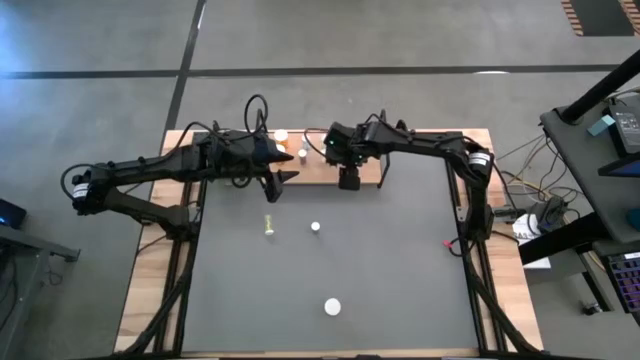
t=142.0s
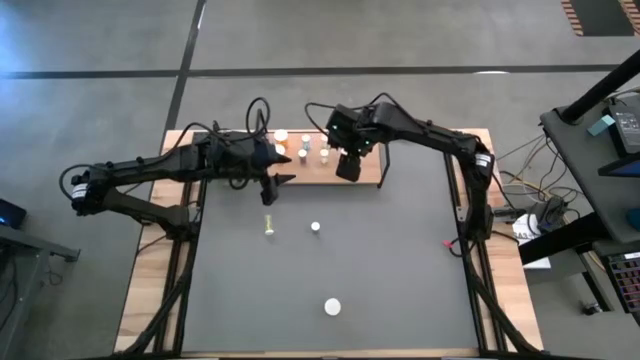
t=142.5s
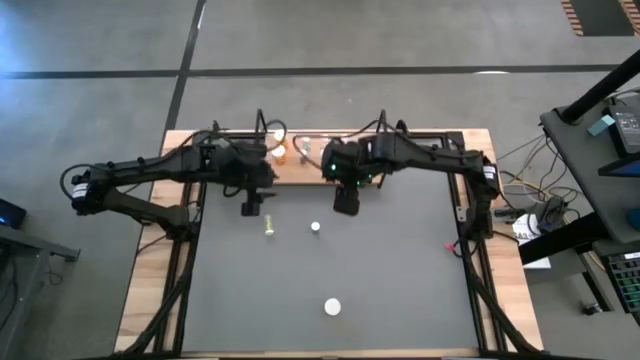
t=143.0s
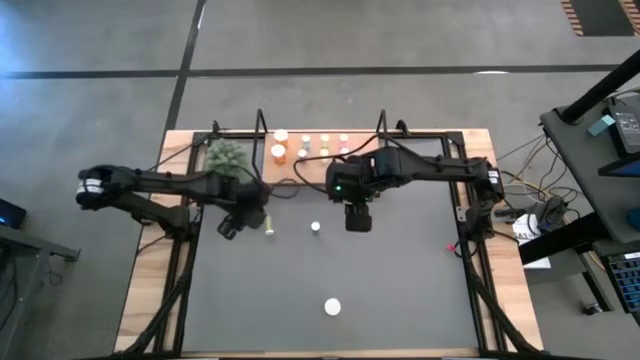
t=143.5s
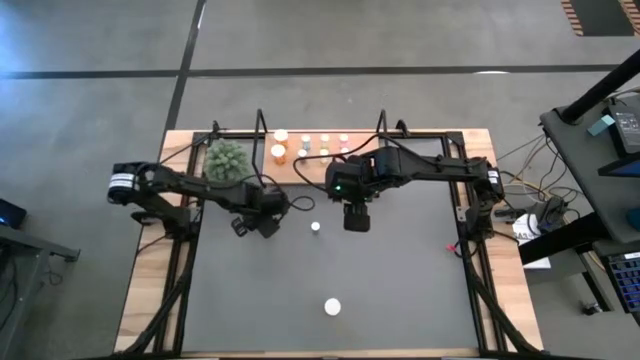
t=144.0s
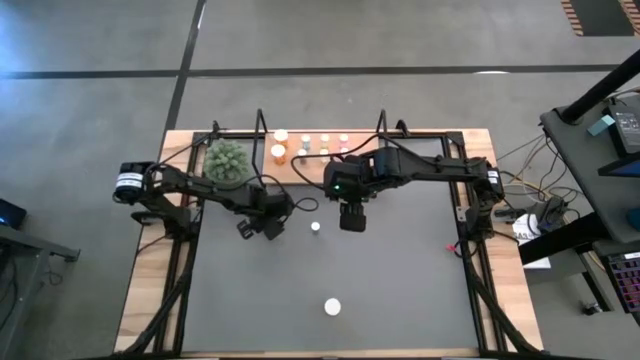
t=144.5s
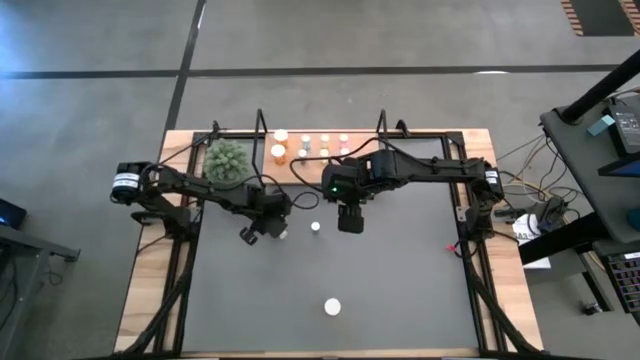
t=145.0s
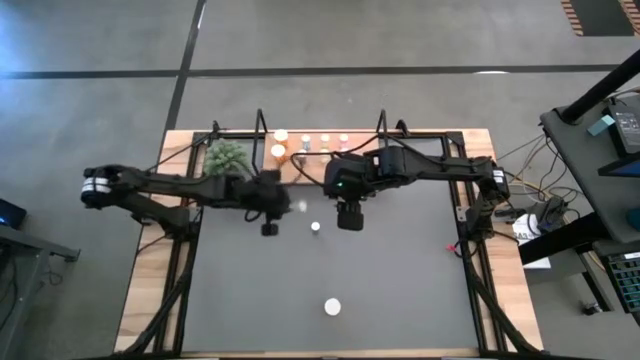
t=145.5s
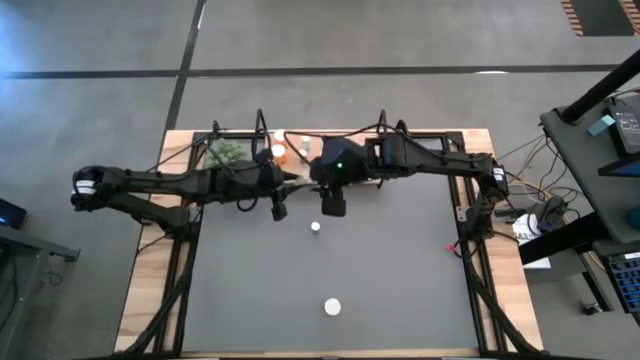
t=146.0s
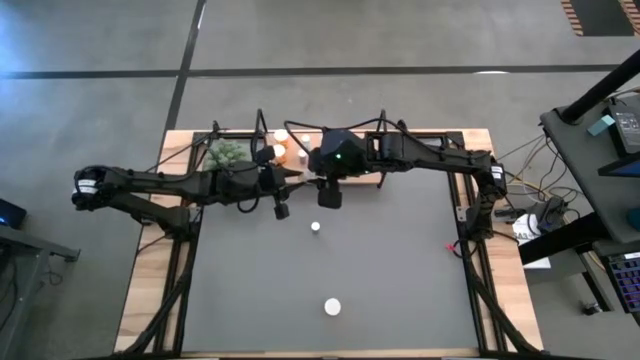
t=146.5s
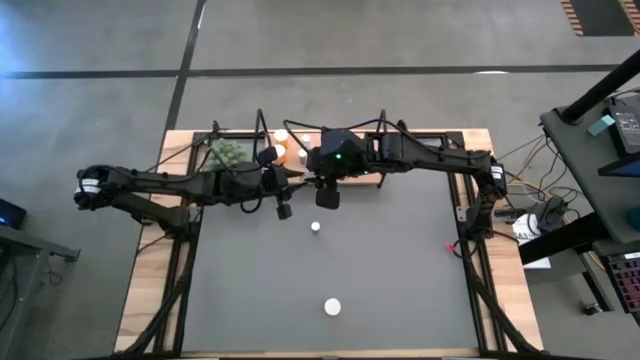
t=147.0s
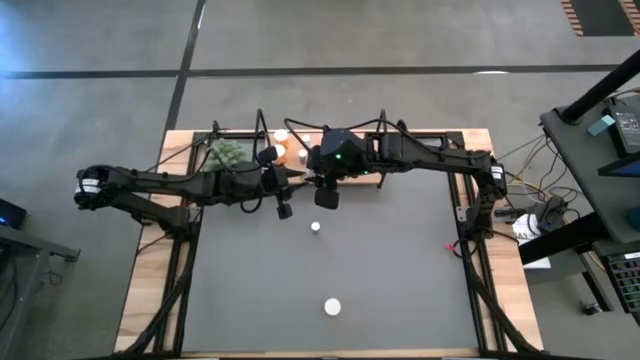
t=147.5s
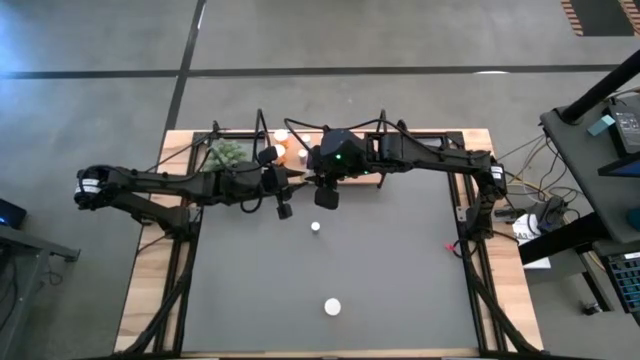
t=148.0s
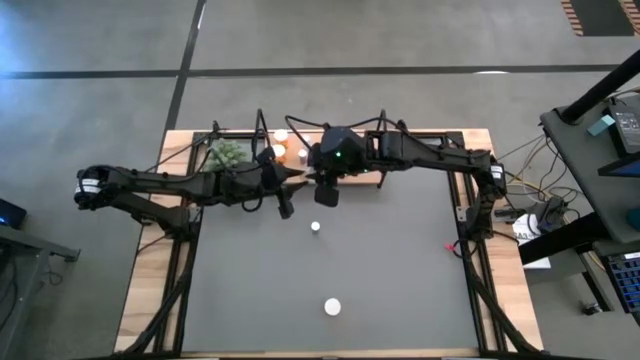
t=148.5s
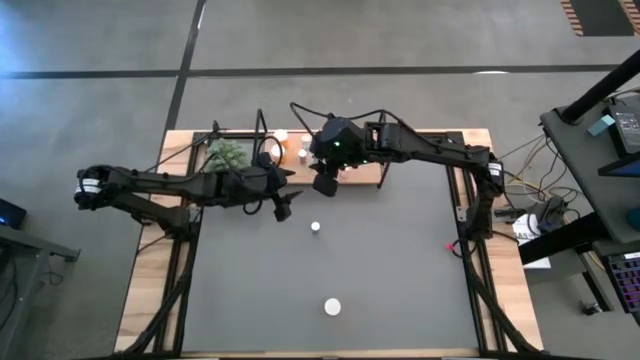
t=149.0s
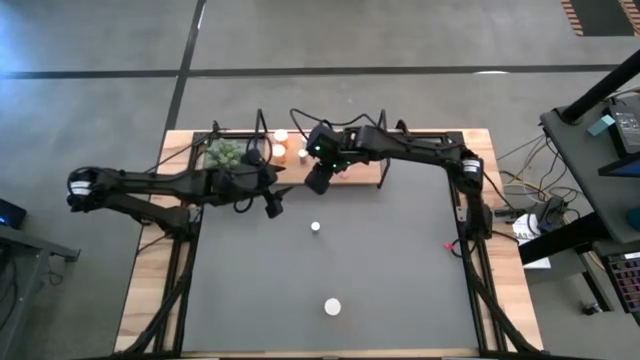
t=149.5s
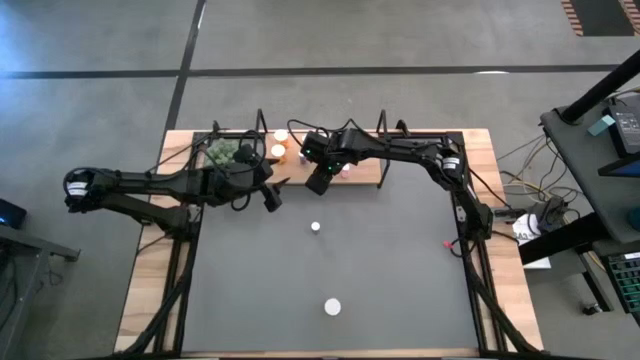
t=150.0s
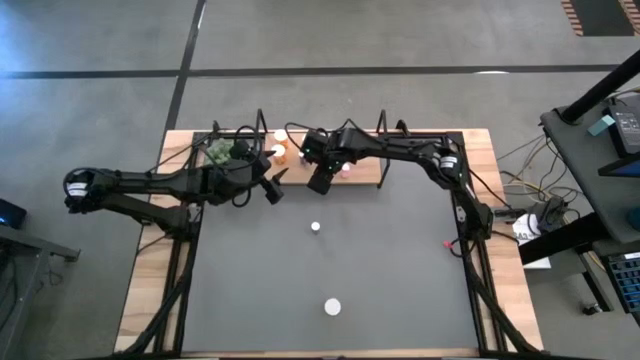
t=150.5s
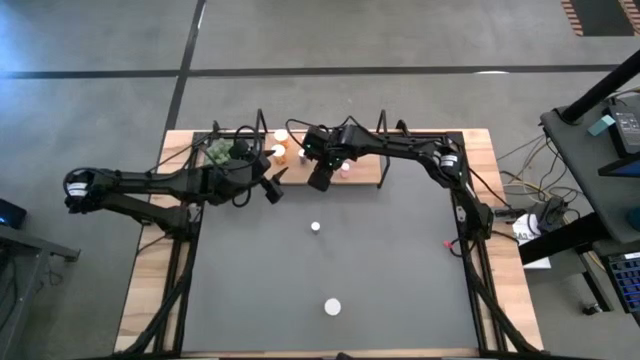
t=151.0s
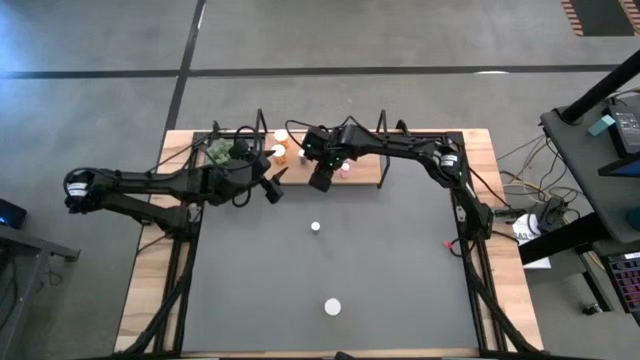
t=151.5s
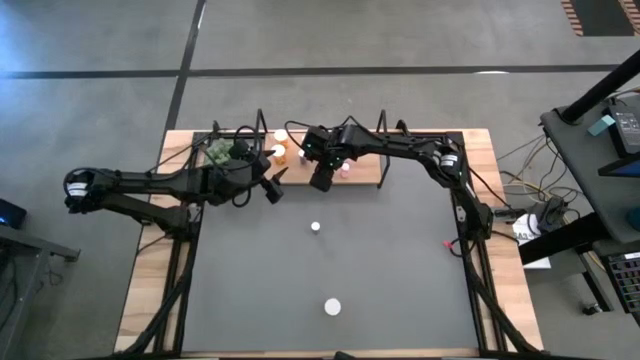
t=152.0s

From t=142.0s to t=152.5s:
Task: Pick and place medicine bottles onto shelf by color
Put the yellow pill bottle on the shelf aligned with the other yellow pill bottles

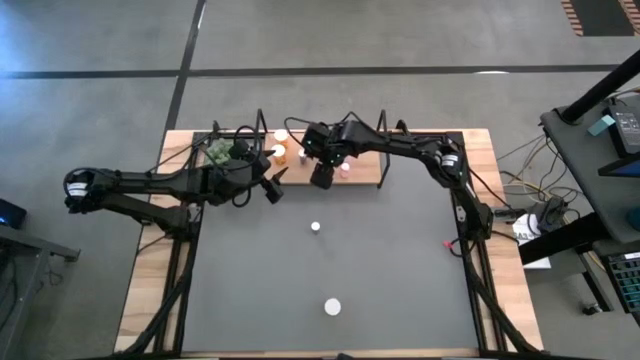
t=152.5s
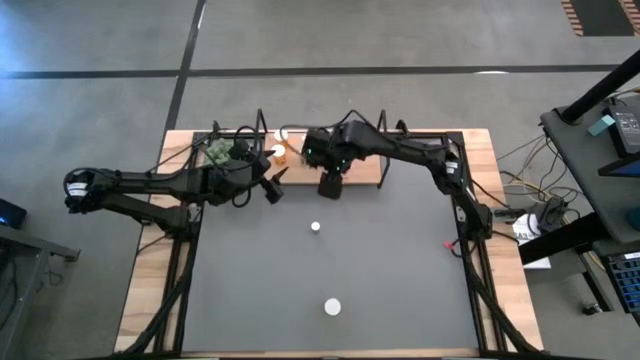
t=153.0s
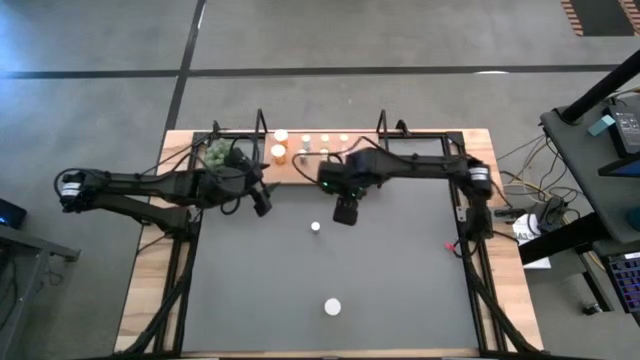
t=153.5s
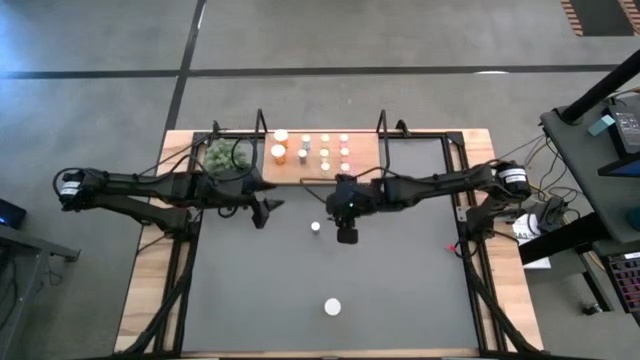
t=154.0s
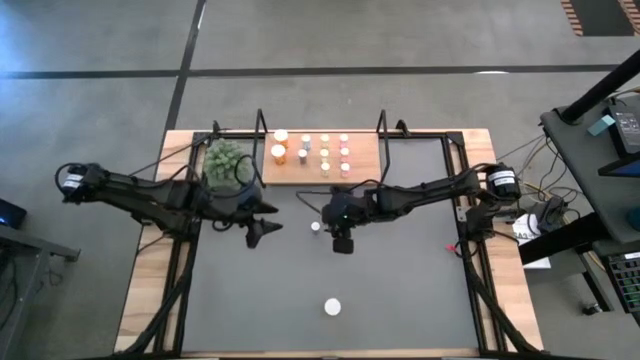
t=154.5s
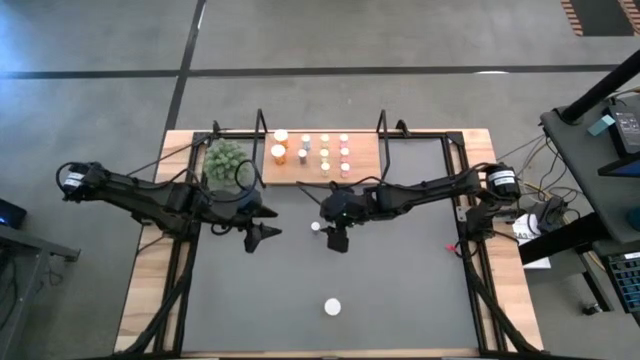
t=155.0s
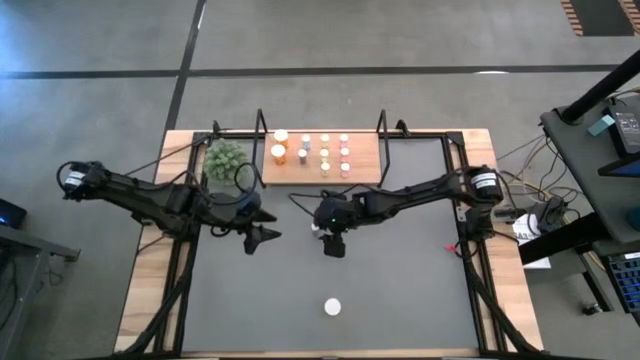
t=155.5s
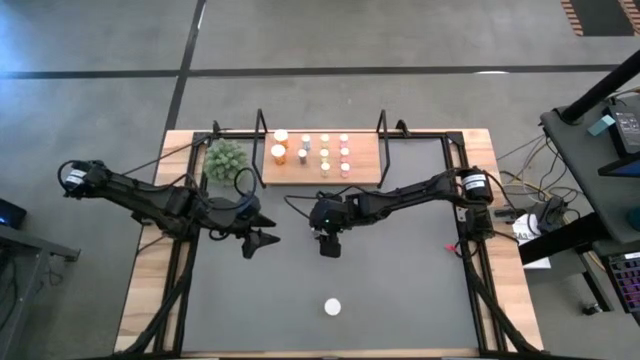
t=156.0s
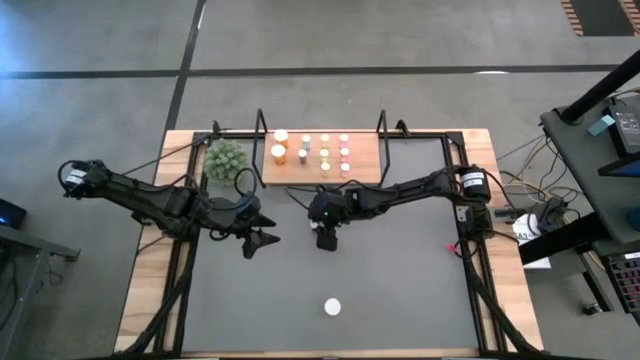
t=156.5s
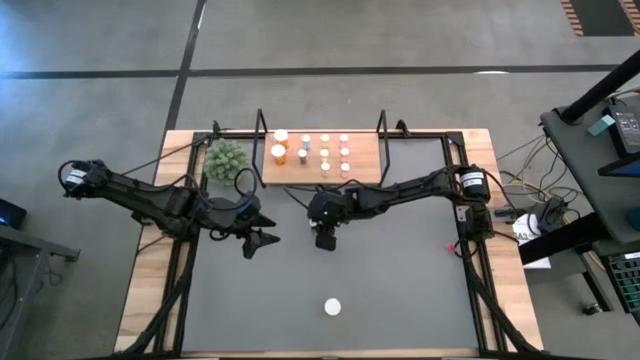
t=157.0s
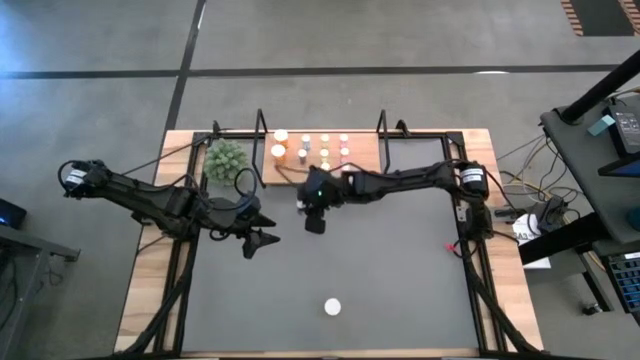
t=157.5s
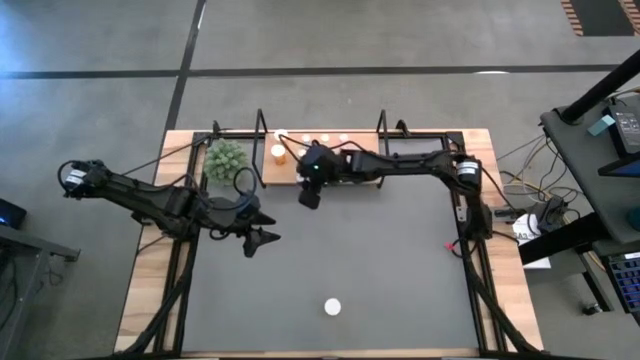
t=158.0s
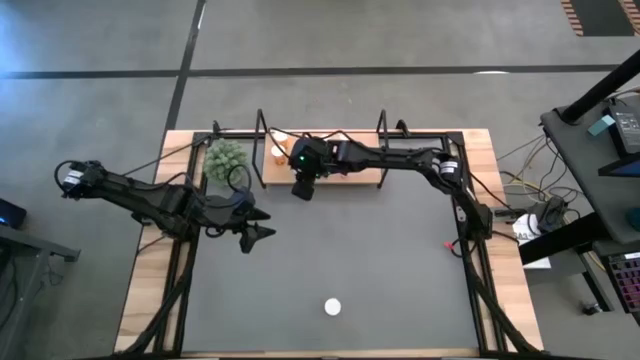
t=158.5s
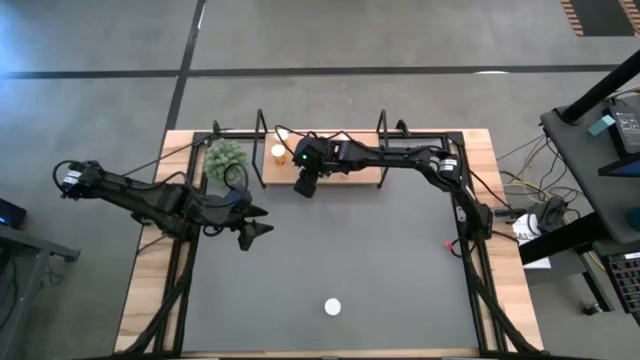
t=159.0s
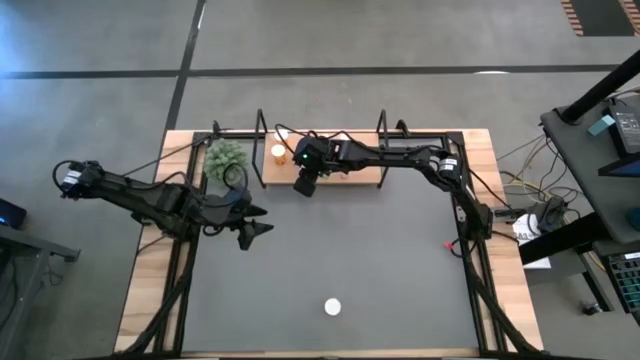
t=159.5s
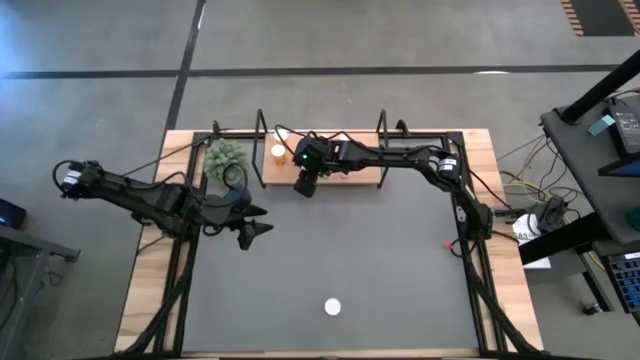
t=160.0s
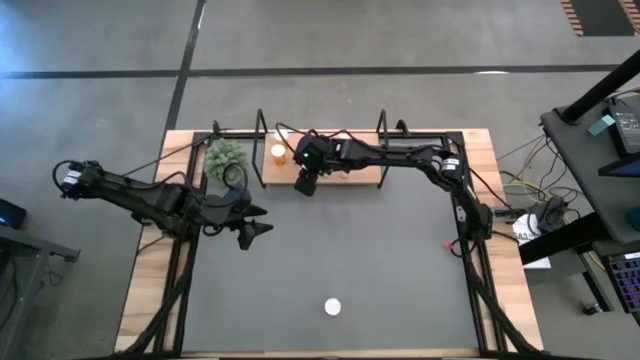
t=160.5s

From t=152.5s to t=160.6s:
Put the blue pill bottle on the shelf aligned with the other blue pill bottles

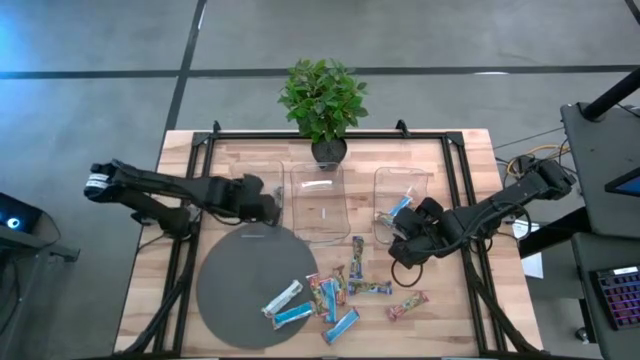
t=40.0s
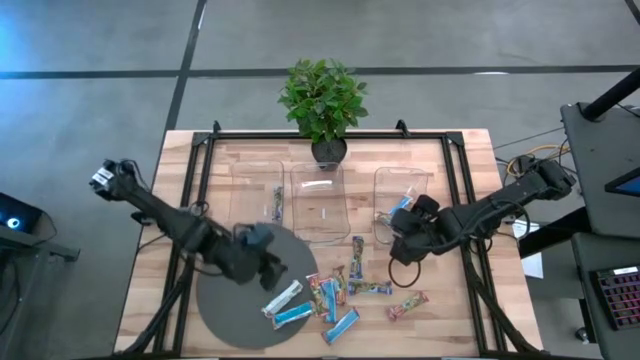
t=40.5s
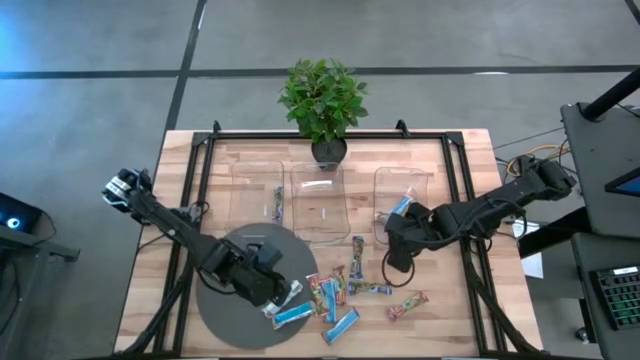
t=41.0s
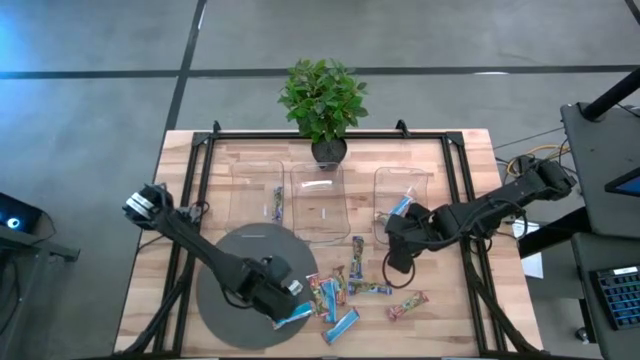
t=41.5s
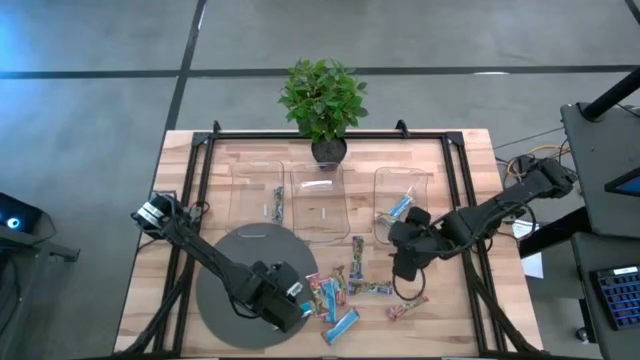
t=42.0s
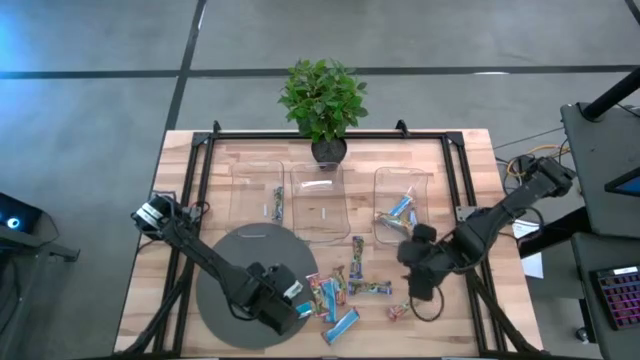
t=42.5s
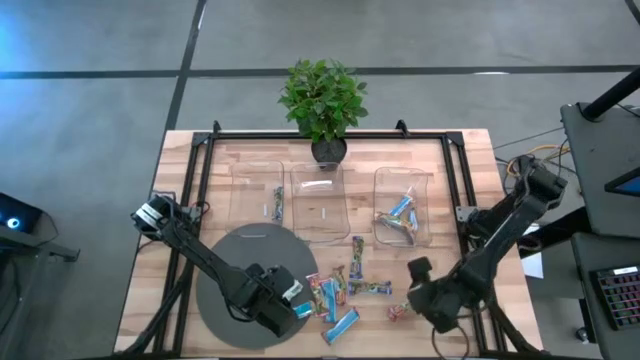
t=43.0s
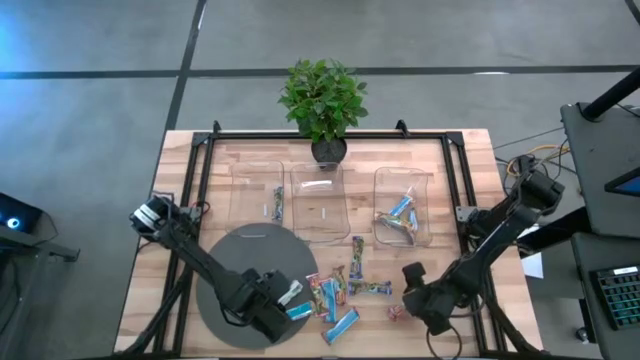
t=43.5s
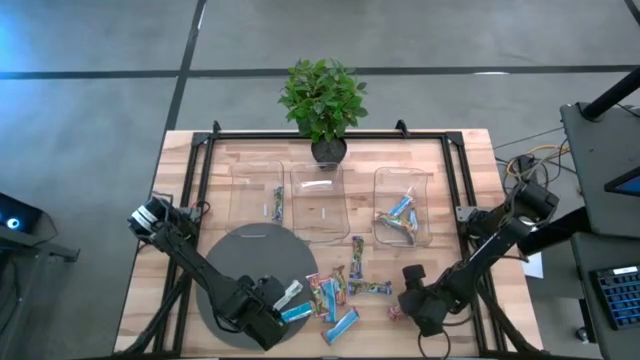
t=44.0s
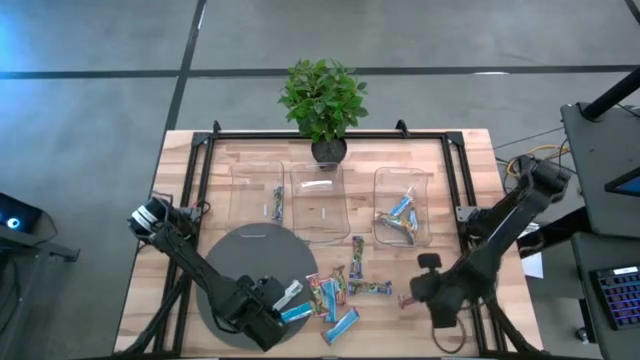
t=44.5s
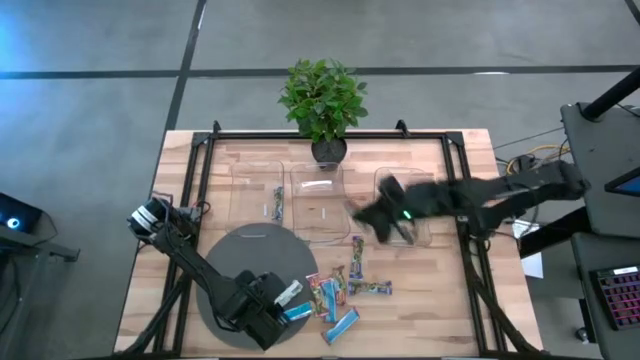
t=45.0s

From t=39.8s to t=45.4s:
Task: Pick and place Granola Bars by type
Put the red granola bar into the middle transparent bin
